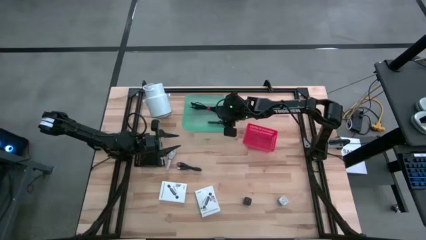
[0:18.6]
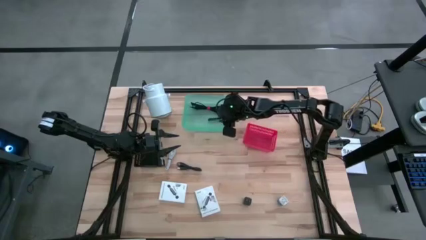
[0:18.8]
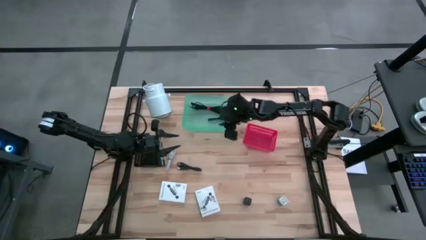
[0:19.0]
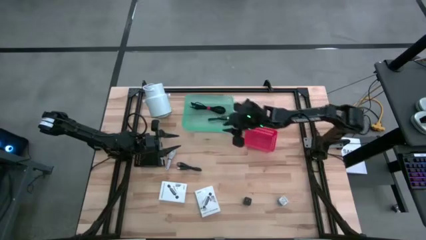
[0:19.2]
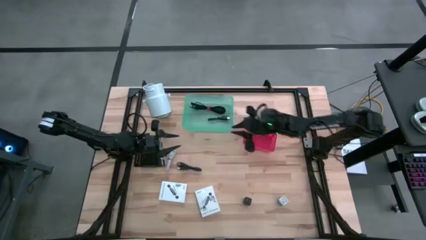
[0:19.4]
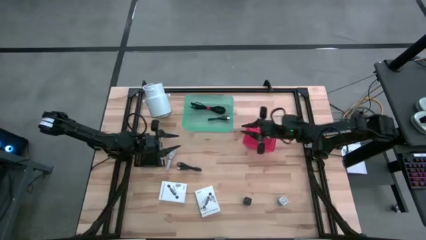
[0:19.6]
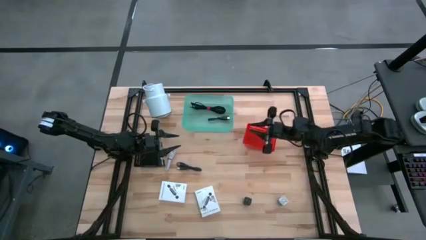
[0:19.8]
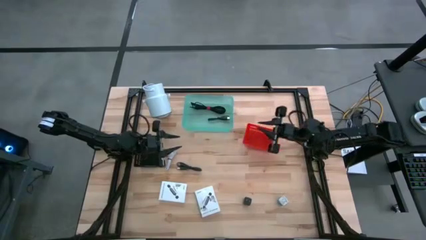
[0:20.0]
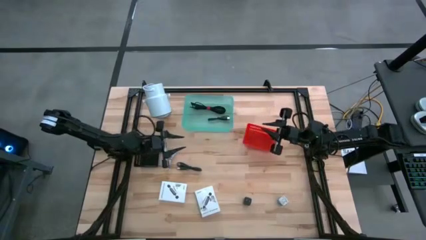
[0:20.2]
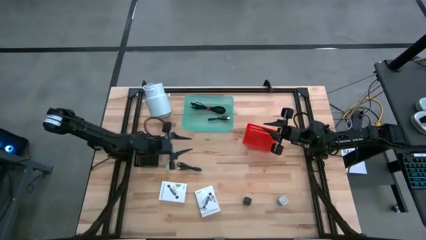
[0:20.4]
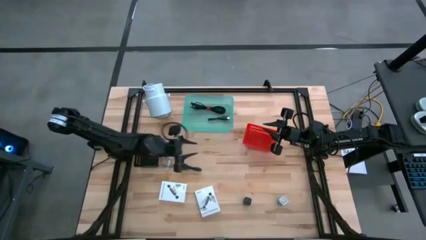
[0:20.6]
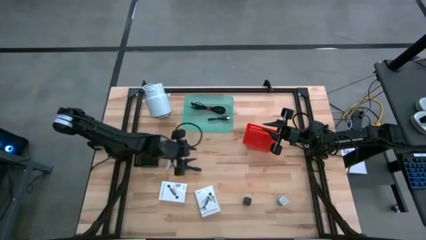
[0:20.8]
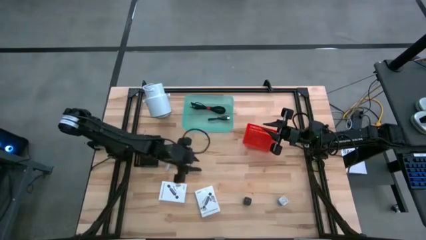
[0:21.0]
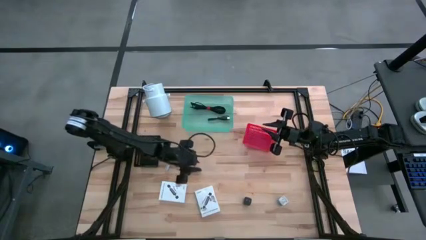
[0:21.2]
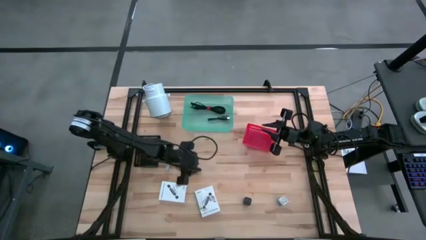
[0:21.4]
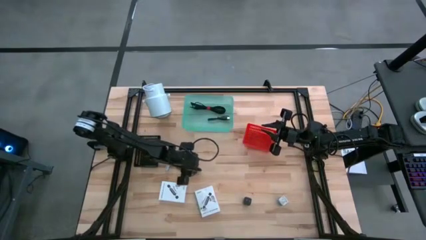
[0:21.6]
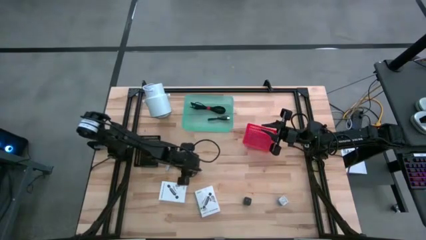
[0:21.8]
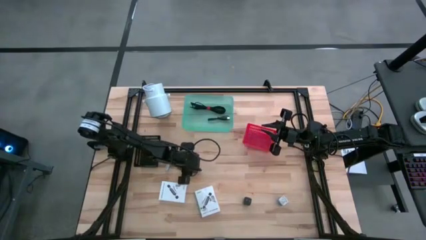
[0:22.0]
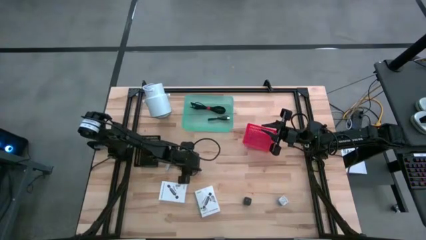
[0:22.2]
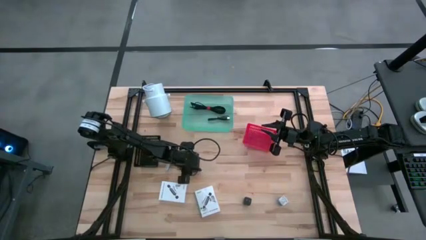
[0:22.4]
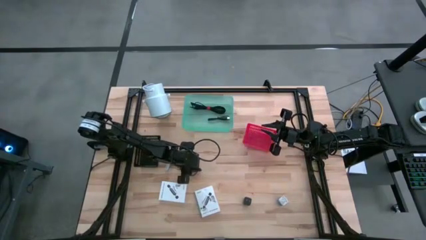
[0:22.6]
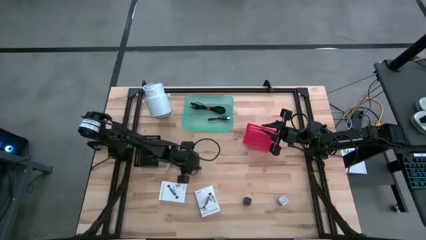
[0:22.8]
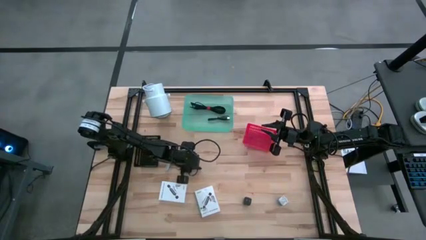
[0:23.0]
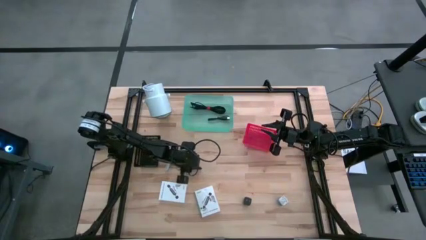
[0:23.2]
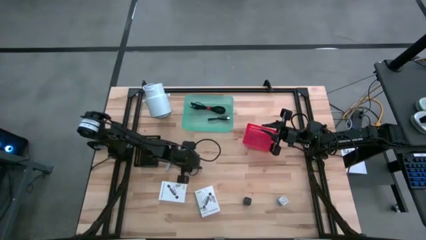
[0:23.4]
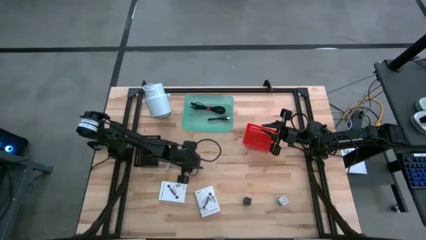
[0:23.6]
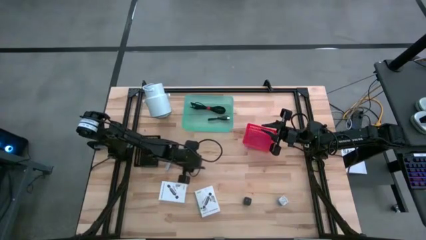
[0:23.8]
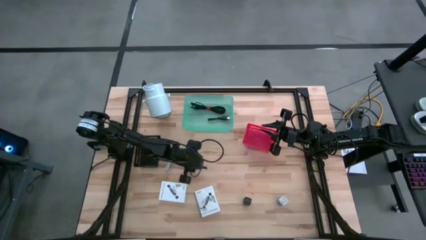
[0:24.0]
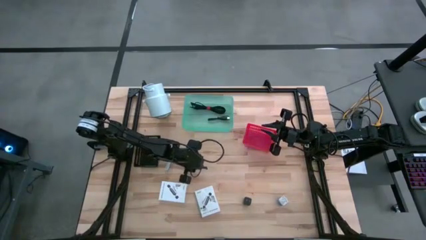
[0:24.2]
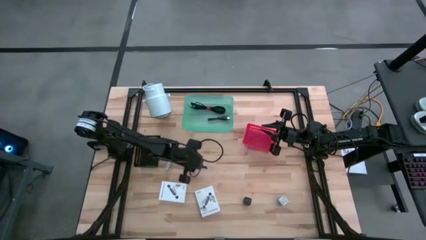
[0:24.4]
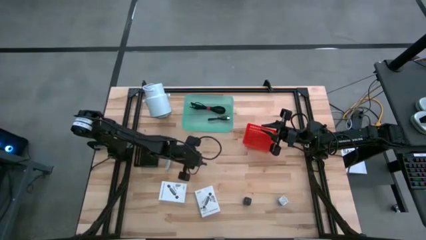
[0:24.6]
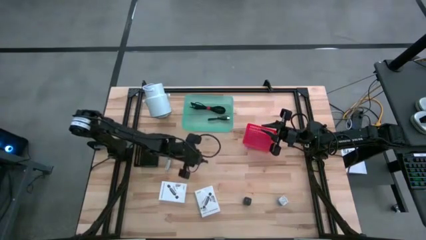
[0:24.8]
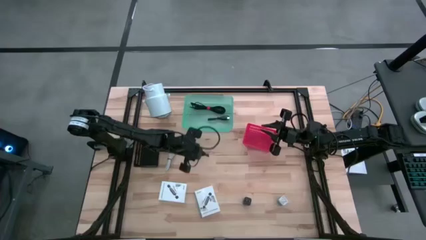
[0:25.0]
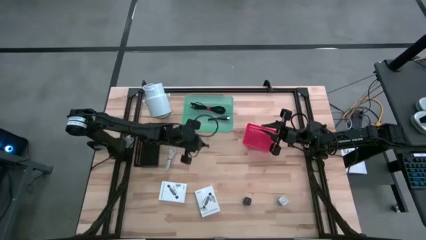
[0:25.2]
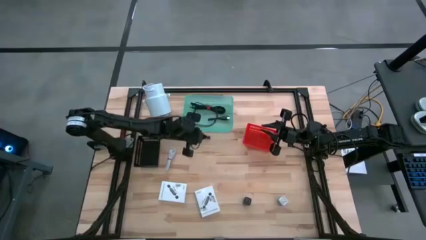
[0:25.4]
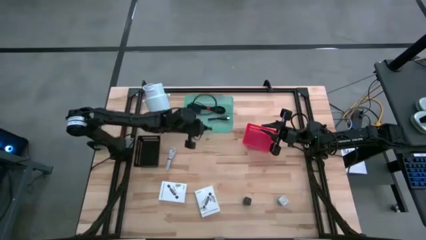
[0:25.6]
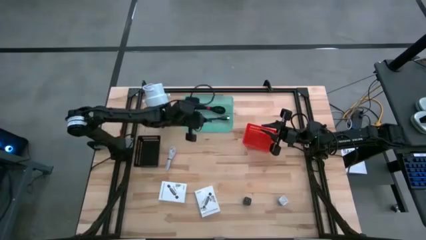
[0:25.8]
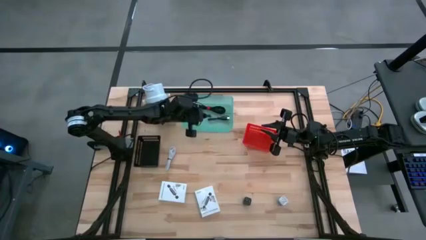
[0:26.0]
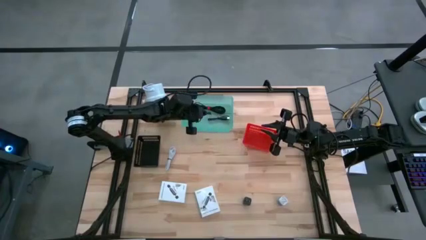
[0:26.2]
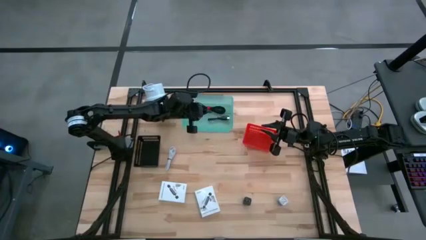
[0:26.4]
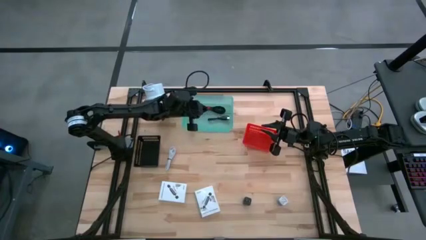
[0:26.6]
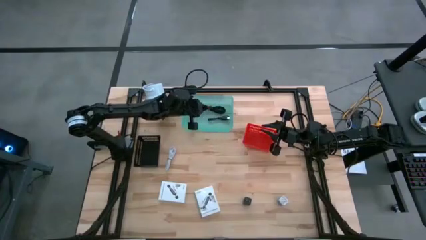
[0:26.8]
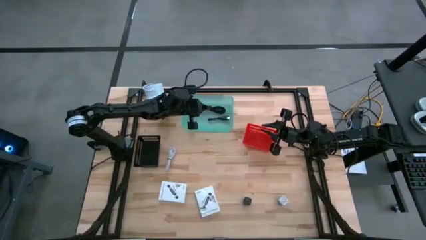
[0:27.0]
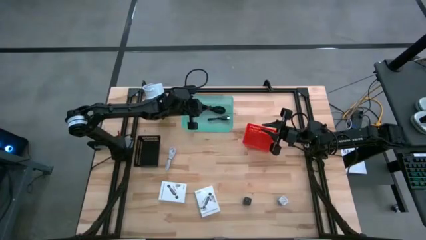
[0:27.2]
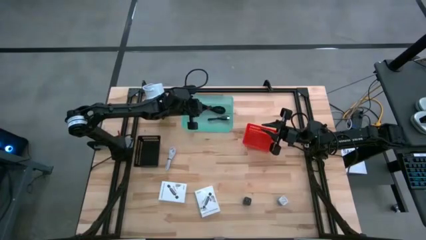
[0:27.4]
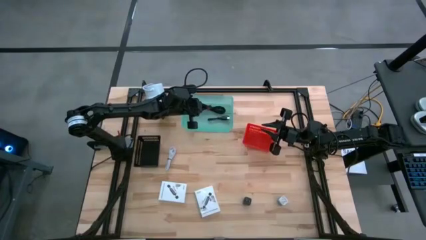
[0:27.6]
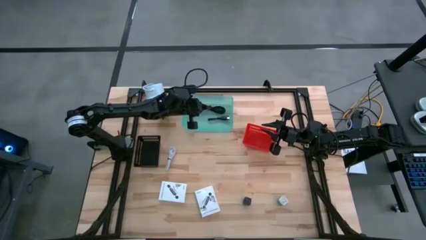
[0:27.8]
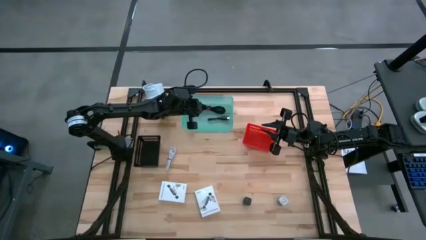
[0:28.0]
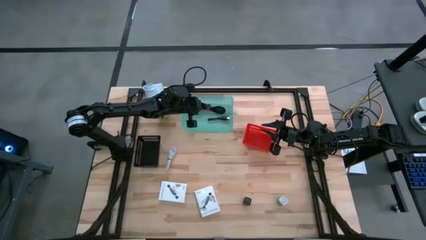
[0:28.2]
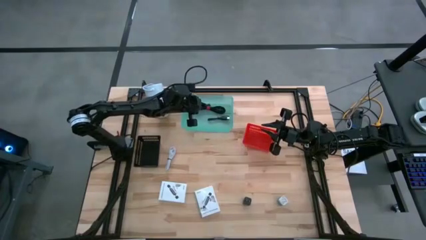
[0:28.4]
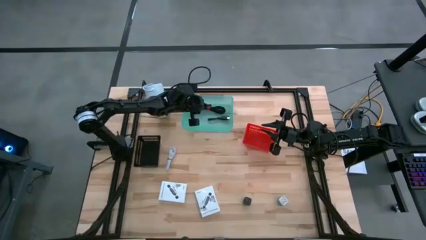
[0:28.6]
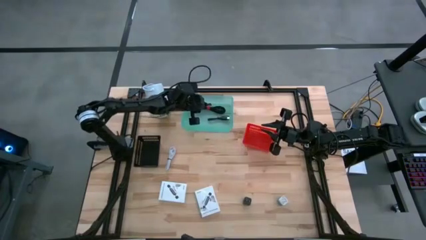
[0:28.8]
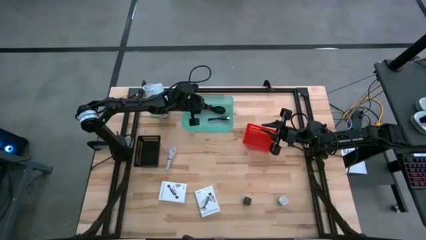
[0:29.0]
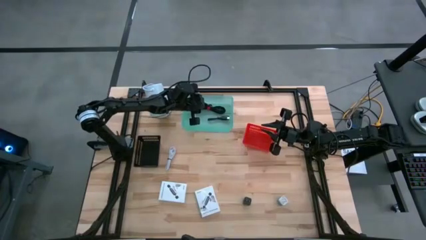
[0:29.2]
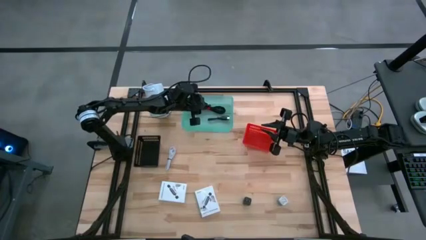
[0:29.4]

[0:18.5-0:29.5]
Task: Pick and place items into bin
Put the black charger cable into the blue bin

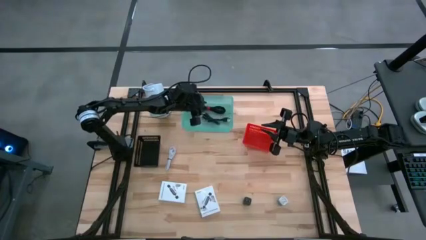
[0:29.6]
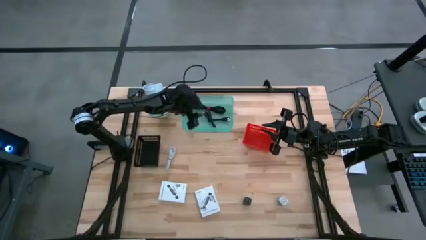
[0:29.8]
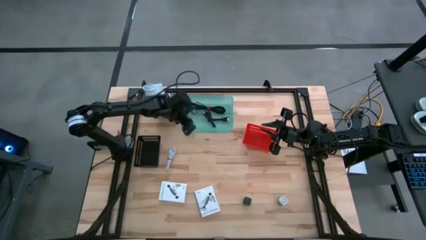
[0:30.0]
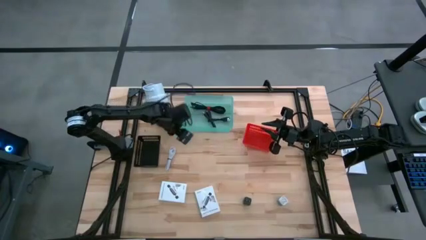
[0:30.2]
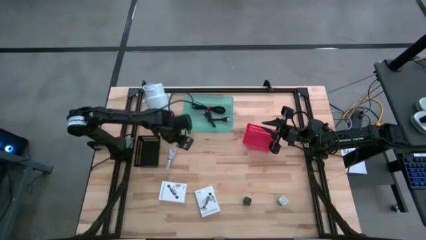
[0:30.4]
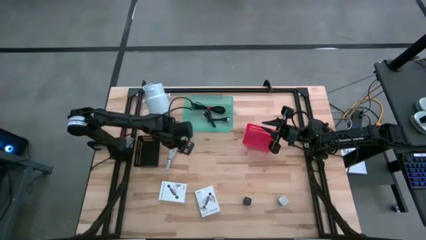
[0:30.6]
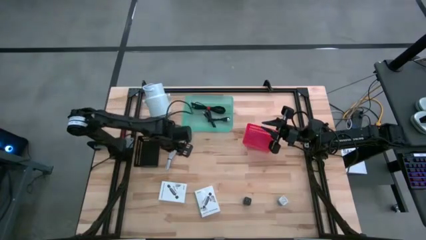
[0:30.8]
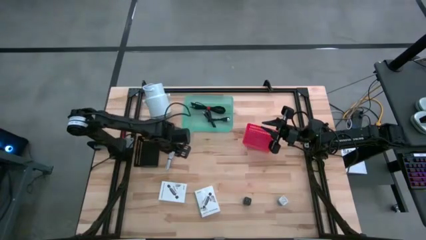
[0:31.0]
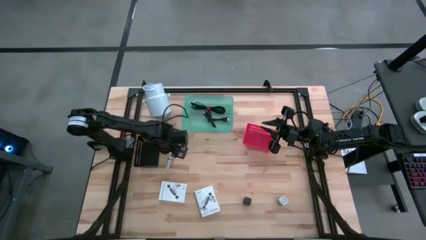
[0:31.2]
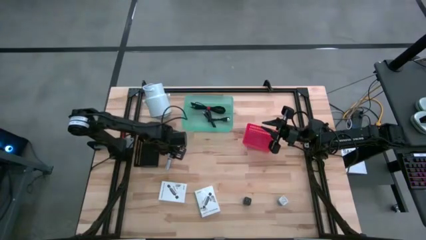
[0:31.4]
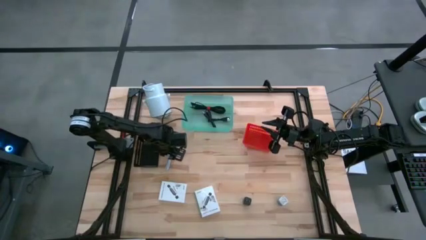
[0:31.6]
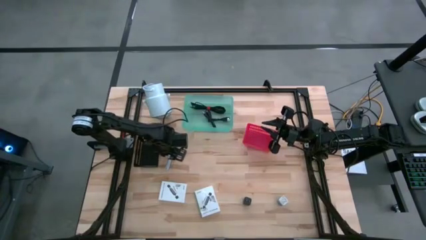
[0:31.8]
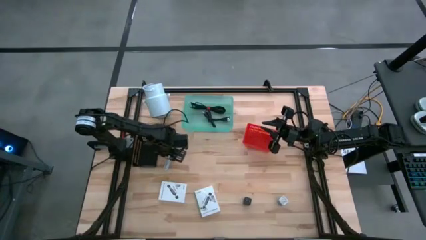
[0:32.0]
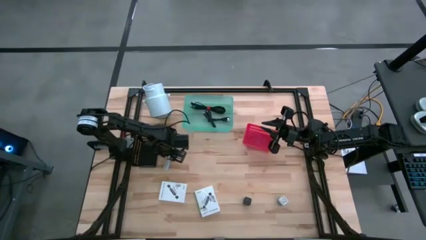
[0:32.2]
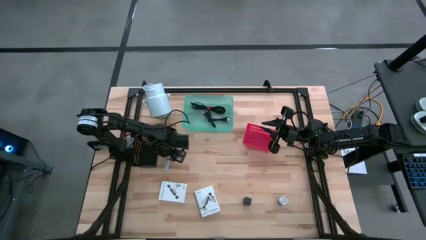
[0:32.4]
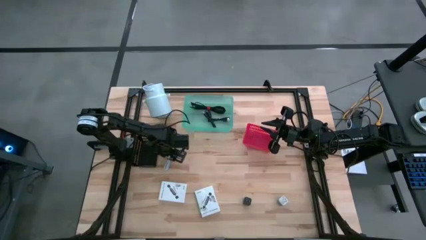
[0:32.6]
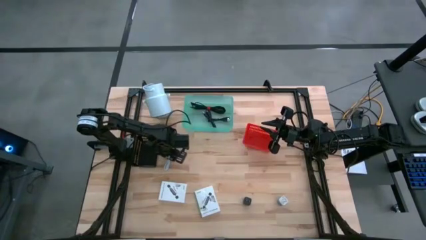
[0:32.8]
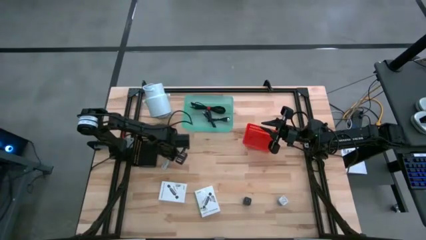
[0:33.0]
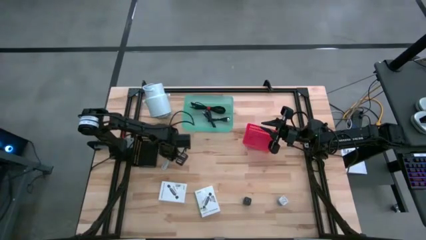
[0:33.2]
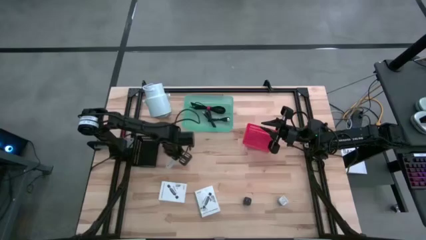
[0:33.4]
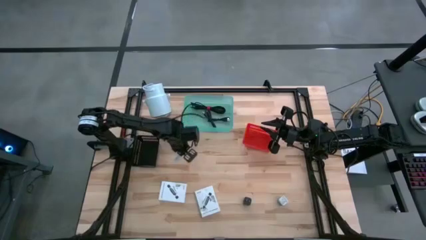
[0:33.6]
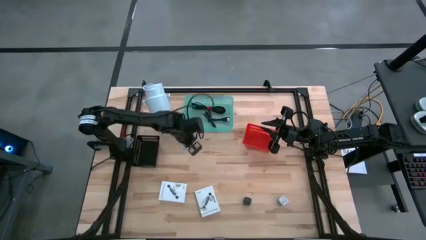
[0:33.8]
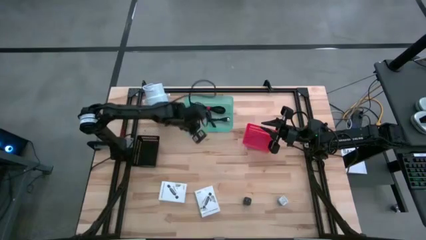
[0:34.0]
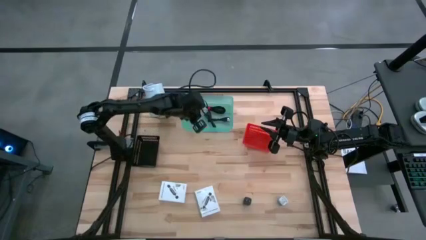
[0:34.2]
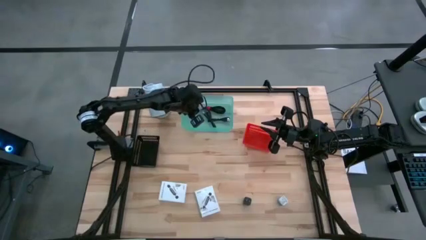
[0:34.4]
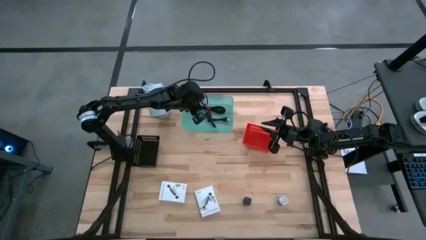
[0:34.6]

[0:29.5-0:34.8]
Put the white charger cable into the blue bin
